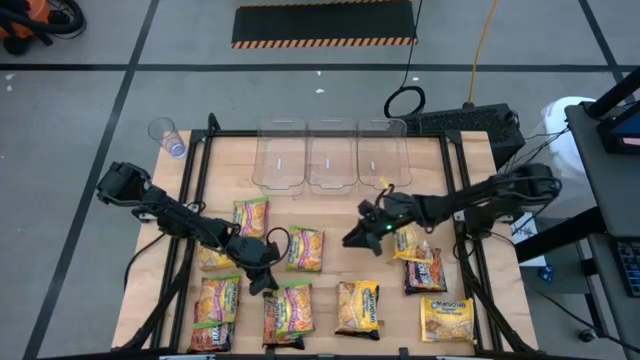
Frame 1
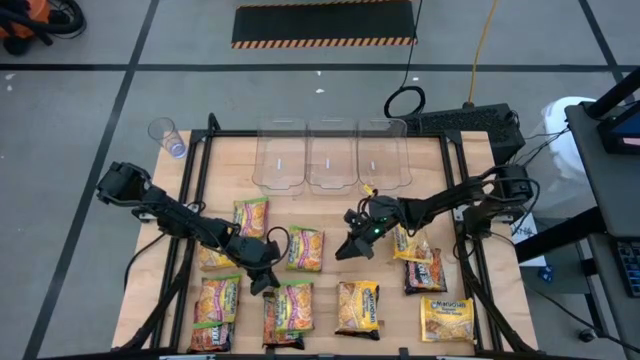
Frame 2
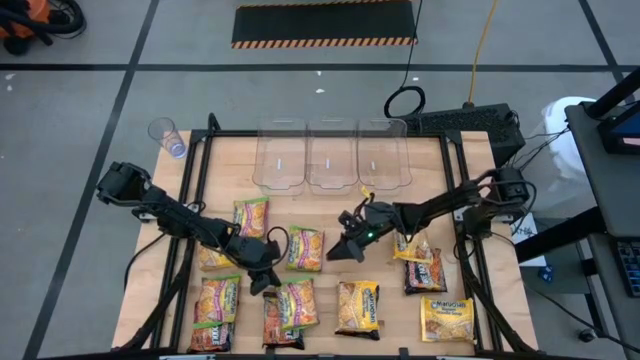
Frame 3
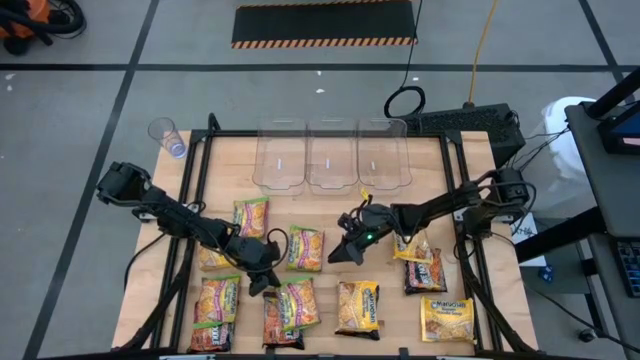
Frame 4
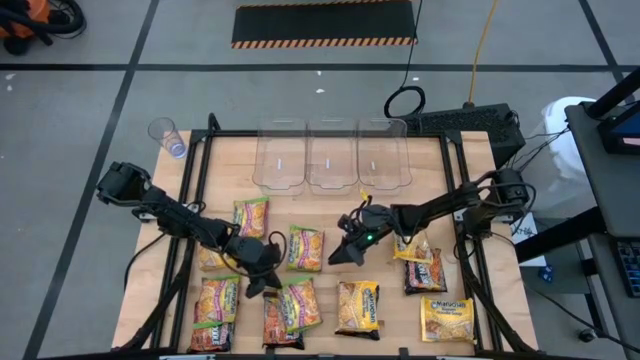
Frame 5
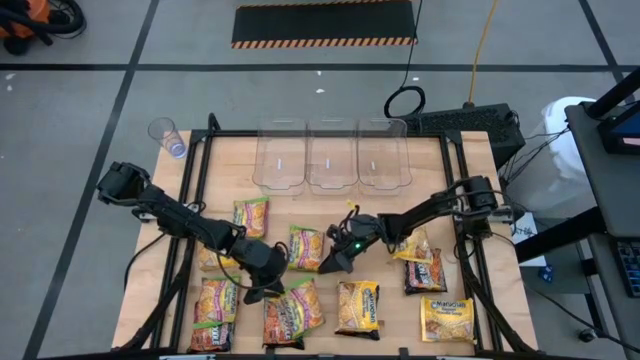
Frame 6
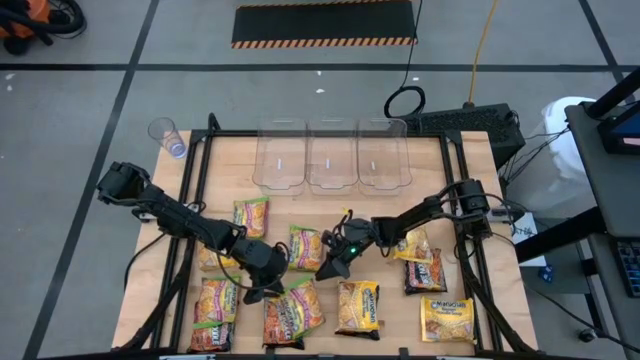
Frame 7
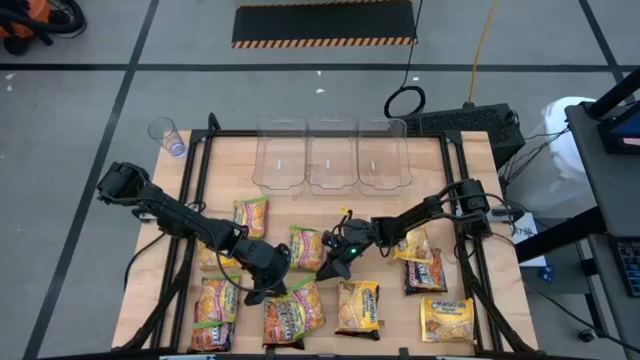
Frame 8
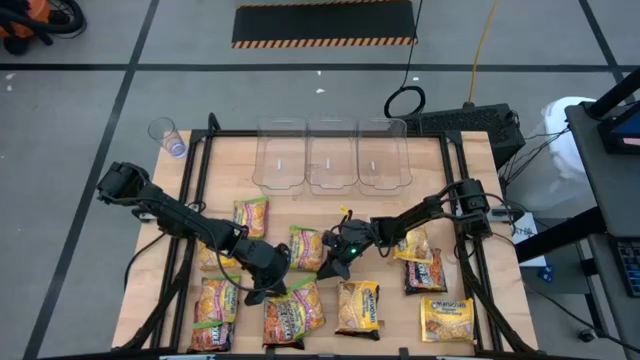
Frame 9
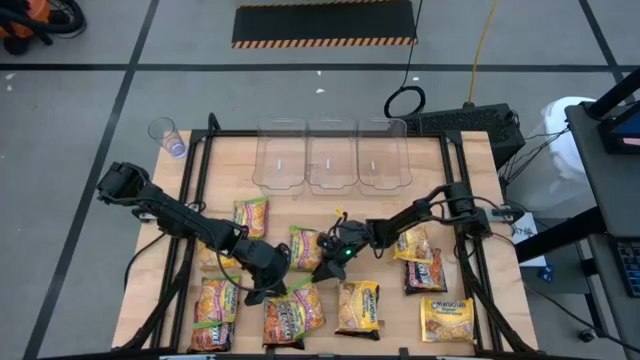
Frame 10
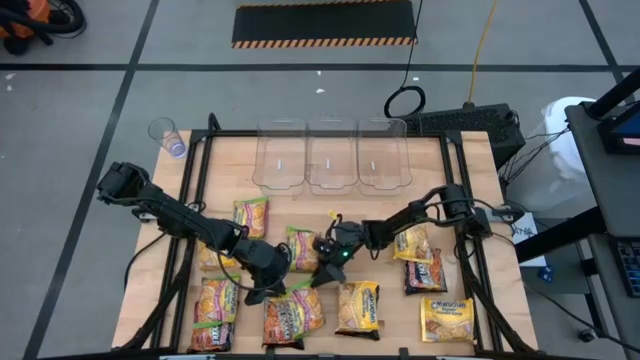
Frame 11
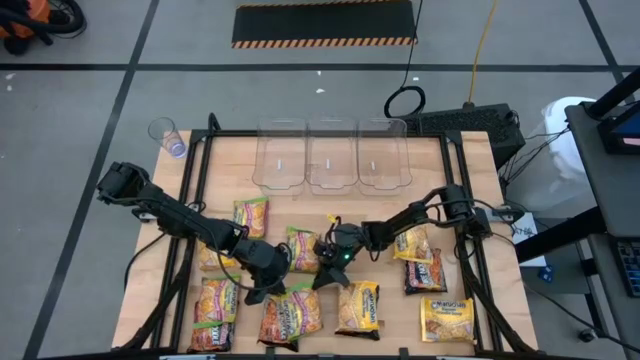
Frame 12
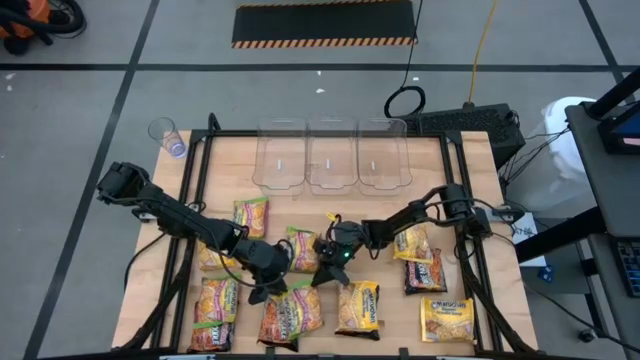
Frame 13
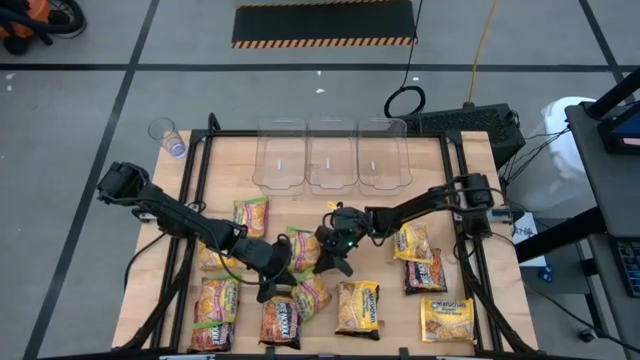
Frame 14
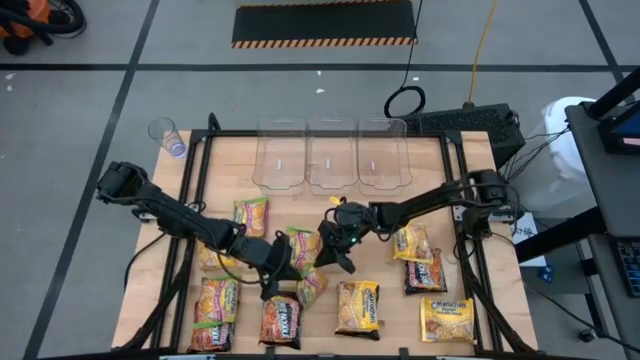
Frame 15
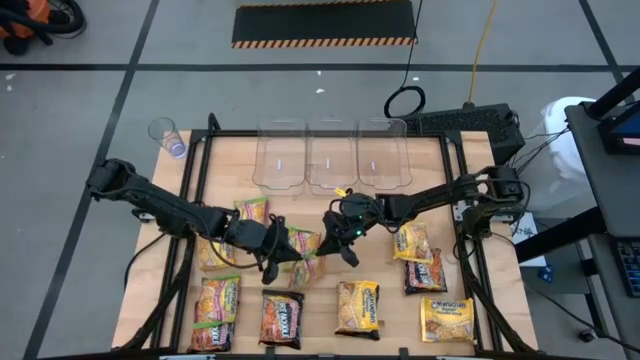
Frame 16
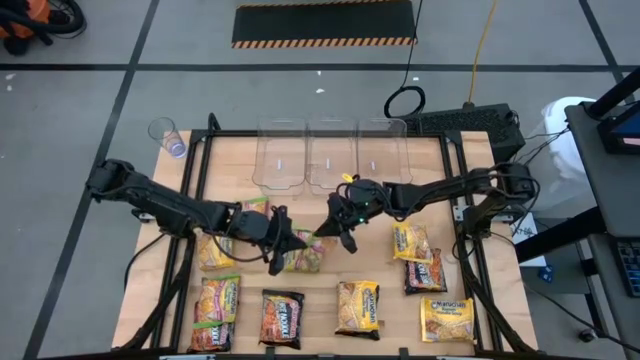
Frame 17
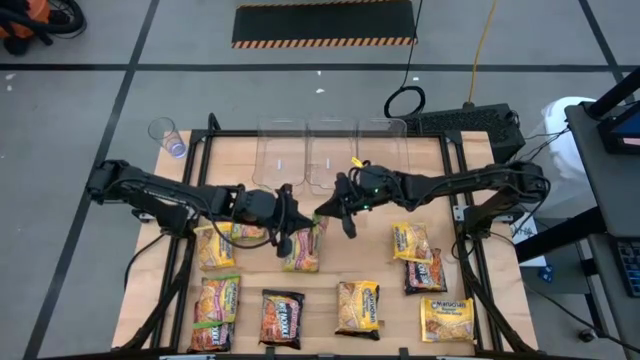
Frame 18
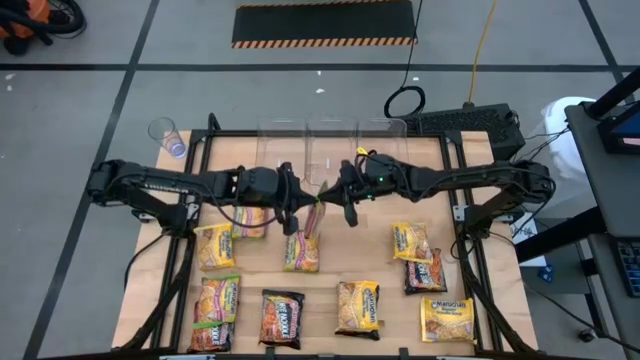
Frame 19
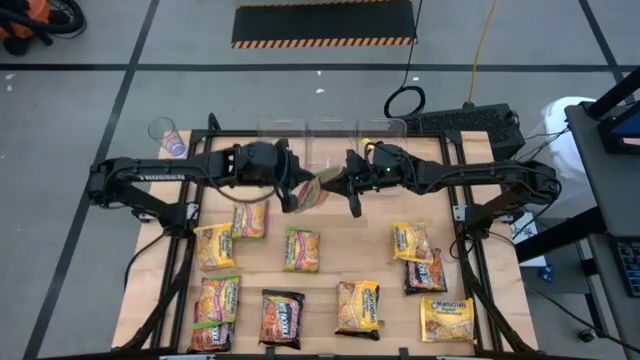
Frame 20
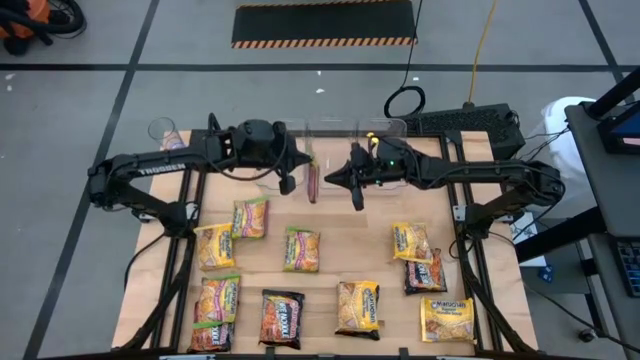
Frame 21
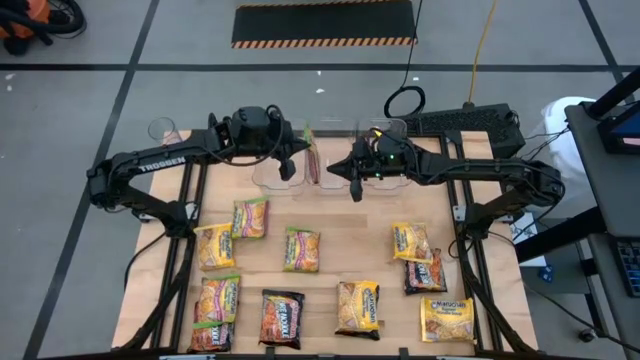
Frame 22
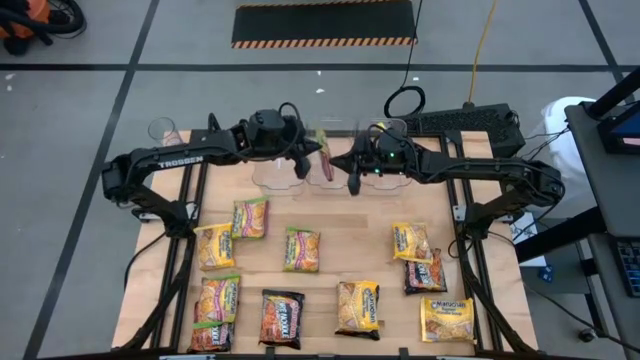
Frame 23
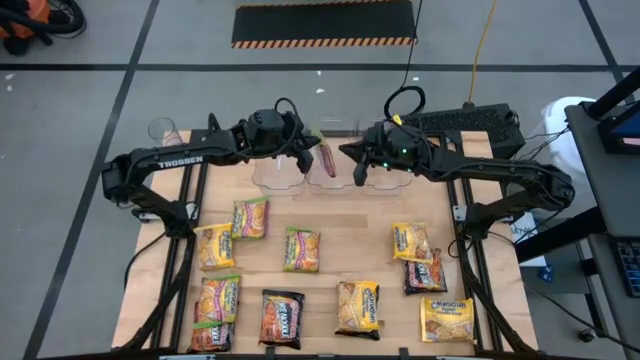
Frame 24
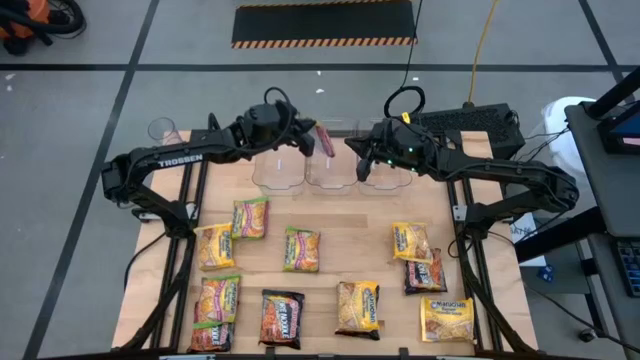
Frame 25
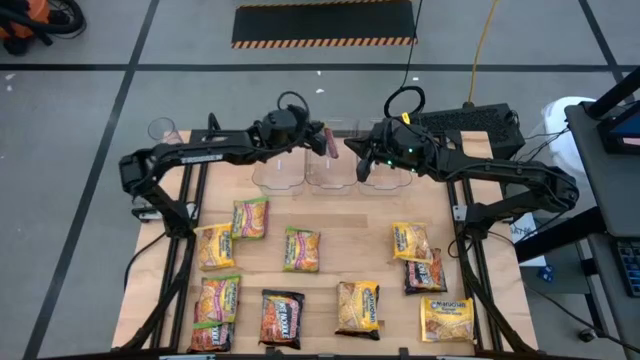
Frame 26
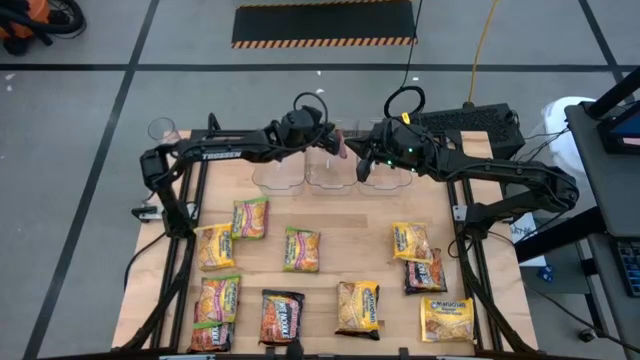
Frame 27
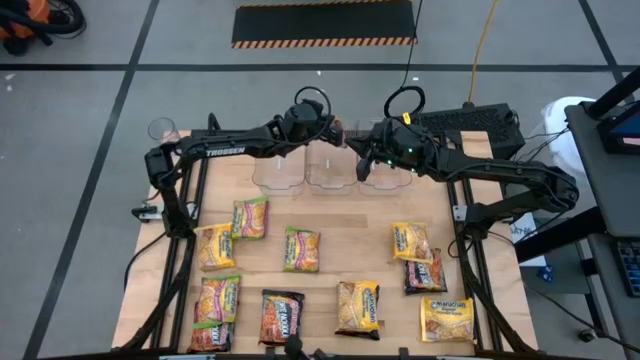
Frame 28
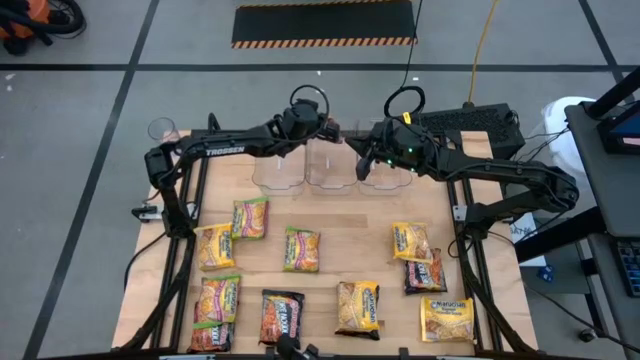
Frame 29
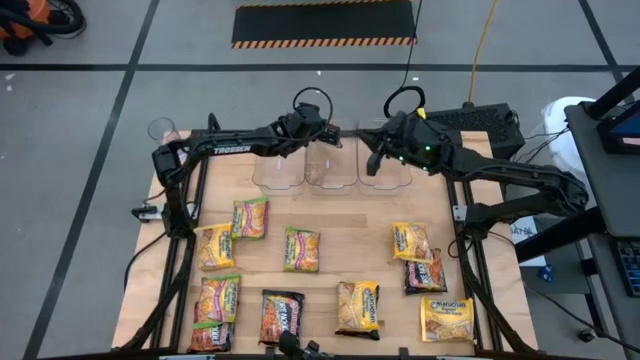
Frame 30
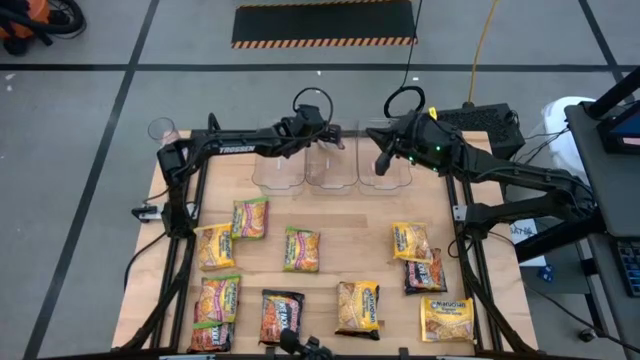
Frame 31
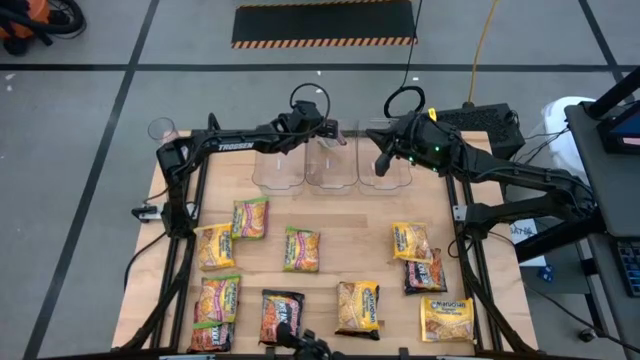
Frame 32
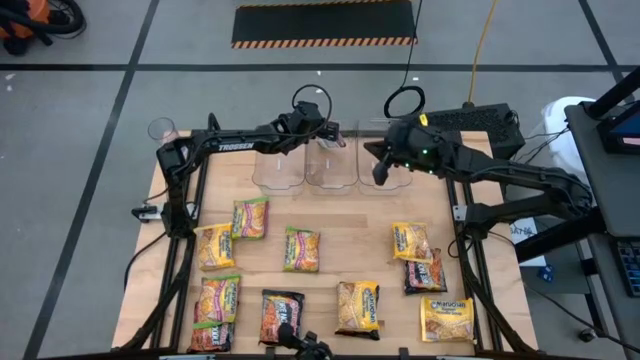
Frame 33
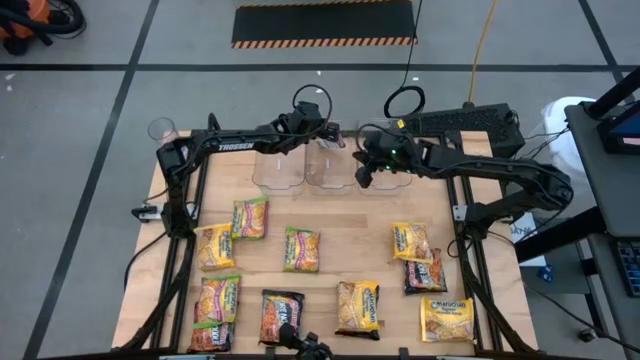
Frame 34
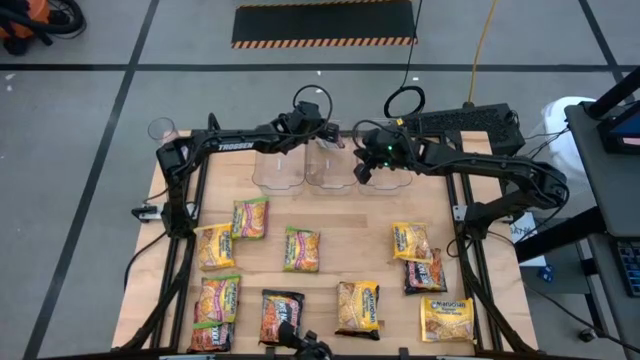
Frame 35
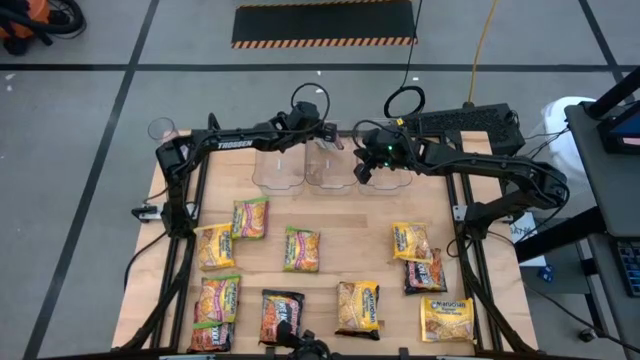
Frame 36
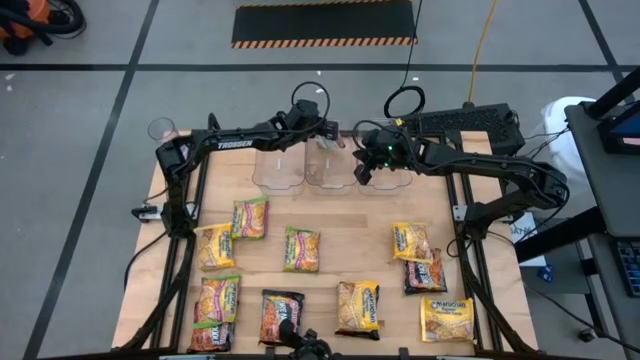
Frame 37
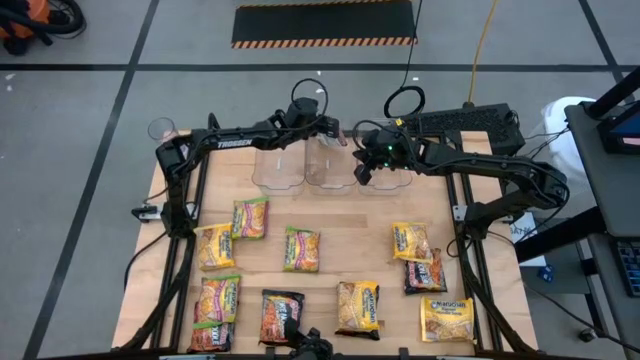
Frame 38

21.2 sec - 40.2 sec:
Task: Sort Maruchan noodles
Put the green noodle pack into the center transparent bin

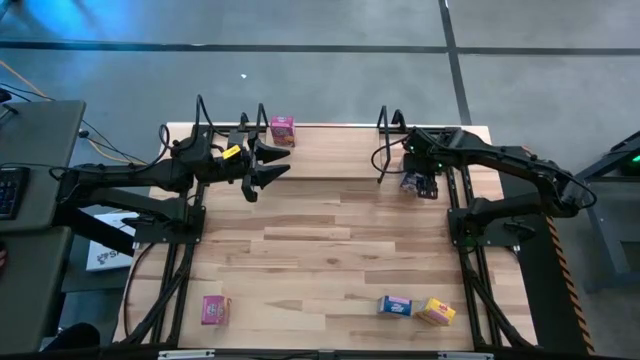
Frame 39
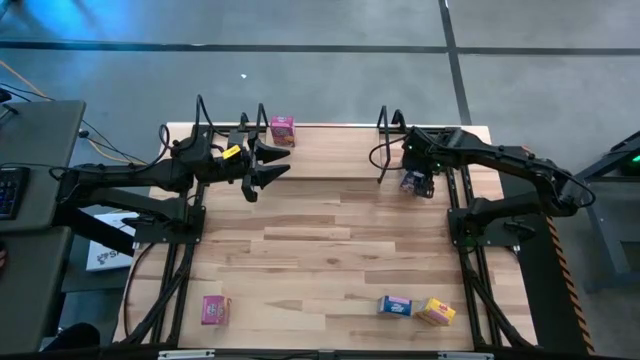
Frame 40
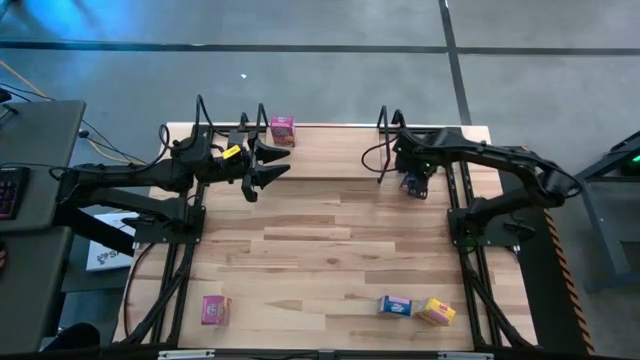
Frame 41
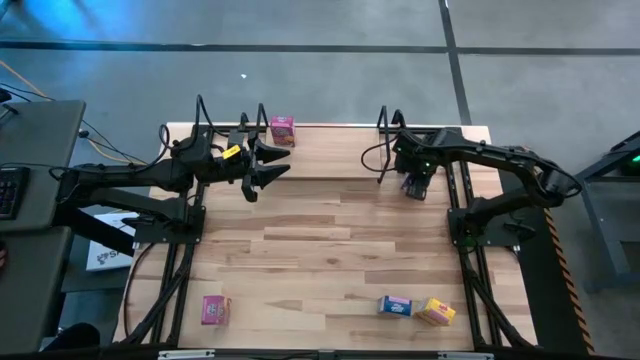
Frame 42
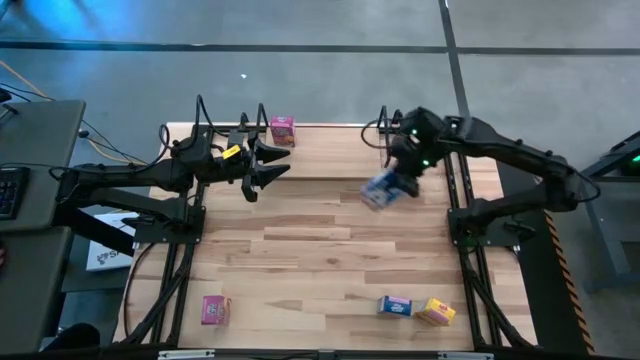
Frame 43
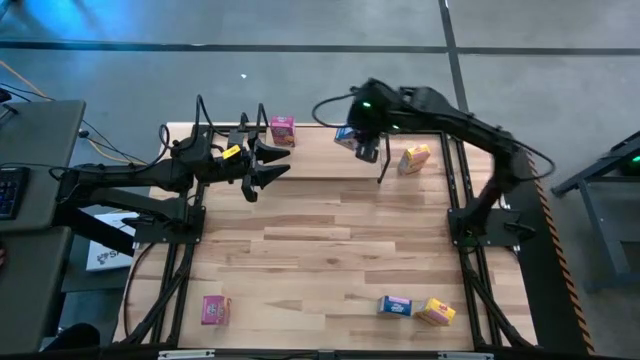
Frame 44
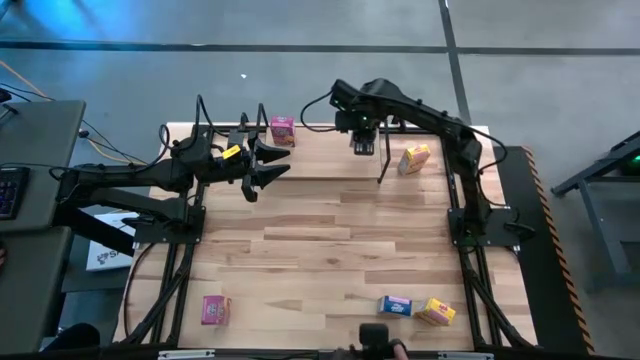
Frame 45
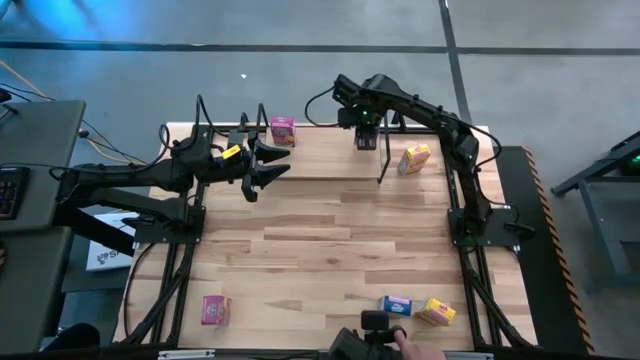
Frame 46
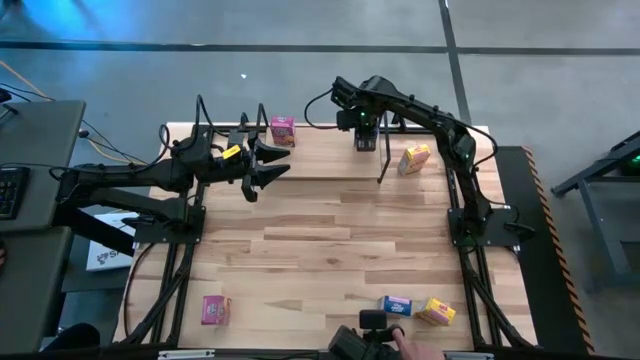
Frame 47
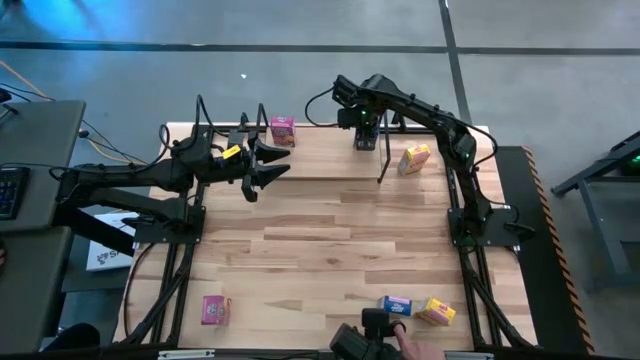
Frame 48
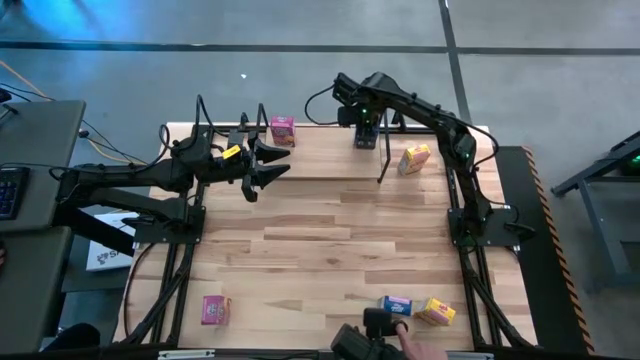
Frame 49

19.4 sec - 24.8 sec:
Task: Stack cereal on shelf
Put the top blue cereal box on the right side of the shelf
